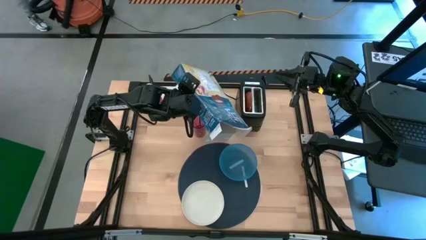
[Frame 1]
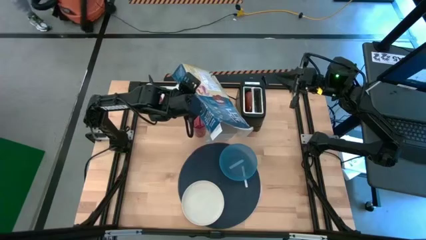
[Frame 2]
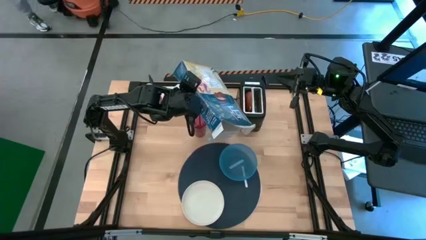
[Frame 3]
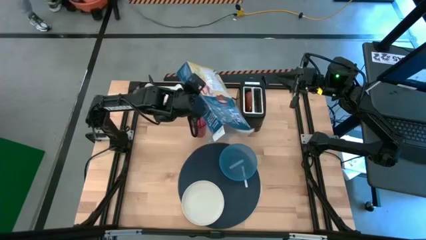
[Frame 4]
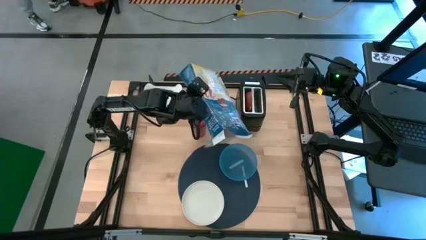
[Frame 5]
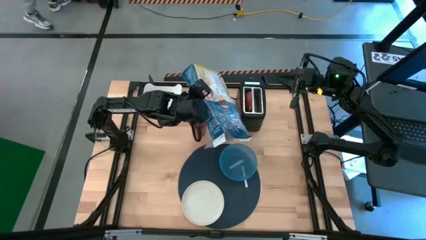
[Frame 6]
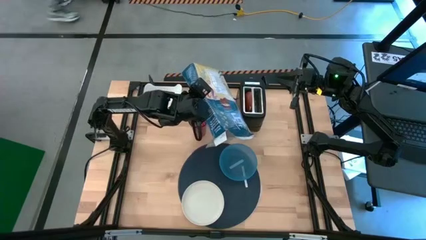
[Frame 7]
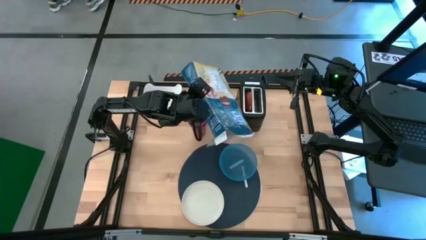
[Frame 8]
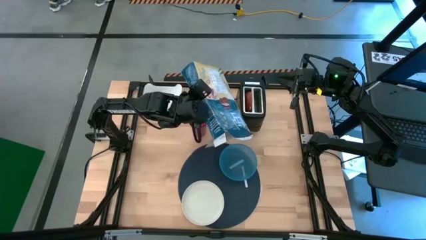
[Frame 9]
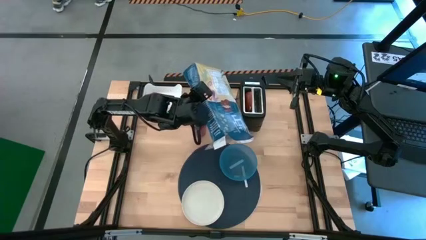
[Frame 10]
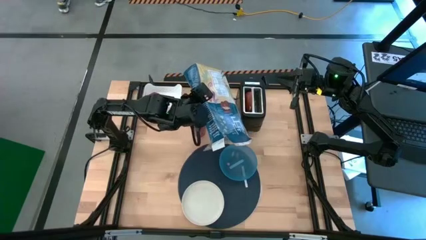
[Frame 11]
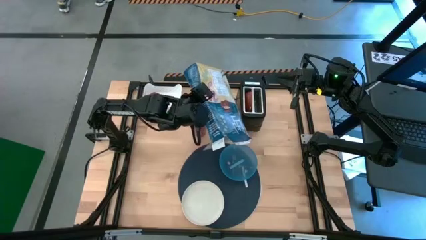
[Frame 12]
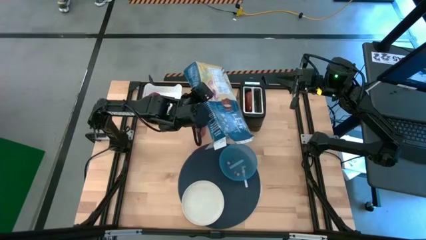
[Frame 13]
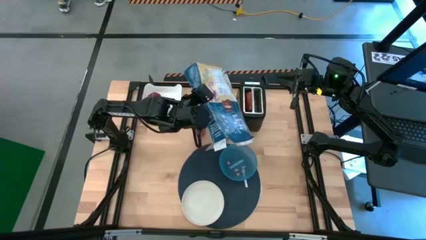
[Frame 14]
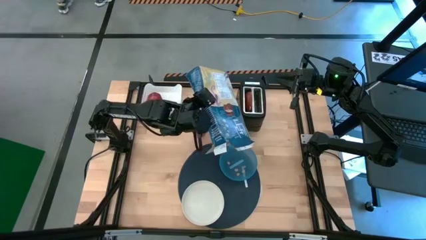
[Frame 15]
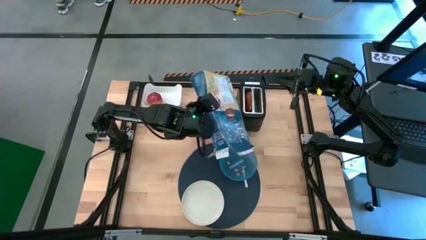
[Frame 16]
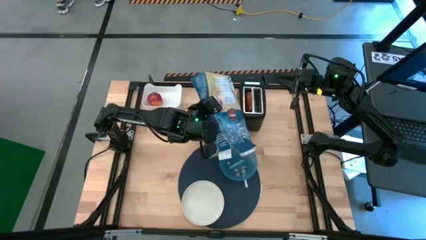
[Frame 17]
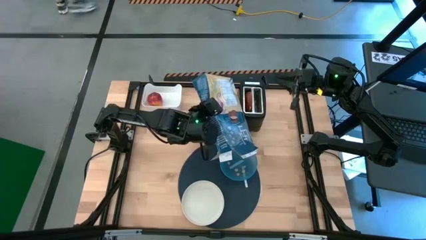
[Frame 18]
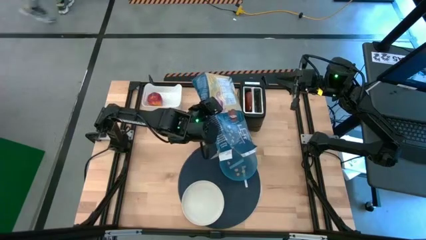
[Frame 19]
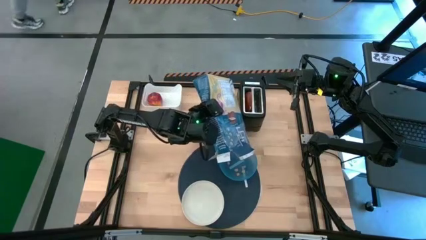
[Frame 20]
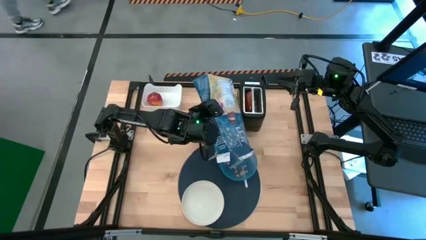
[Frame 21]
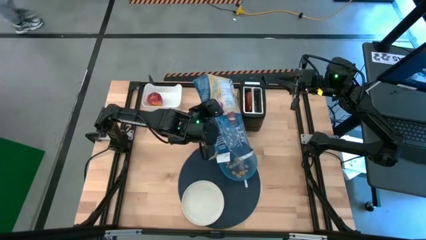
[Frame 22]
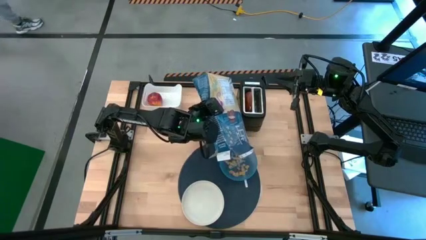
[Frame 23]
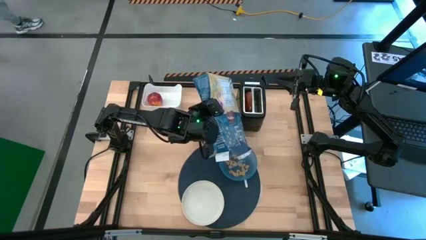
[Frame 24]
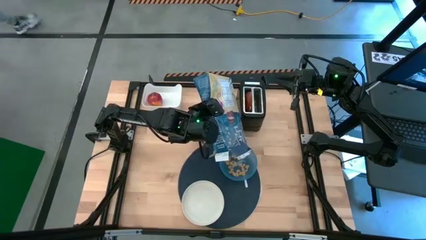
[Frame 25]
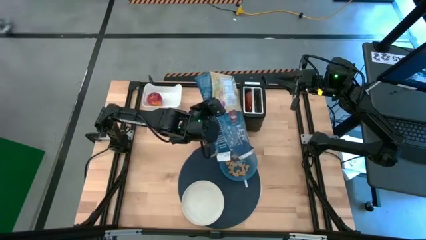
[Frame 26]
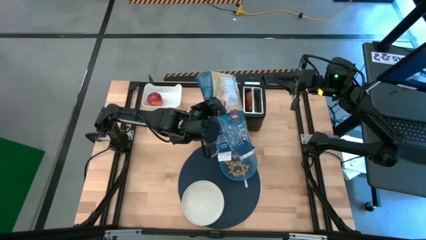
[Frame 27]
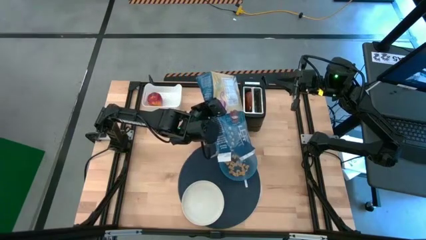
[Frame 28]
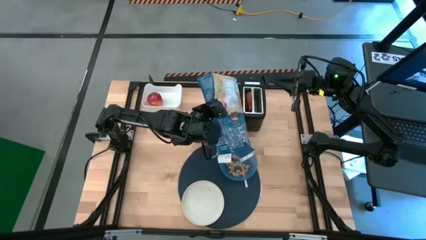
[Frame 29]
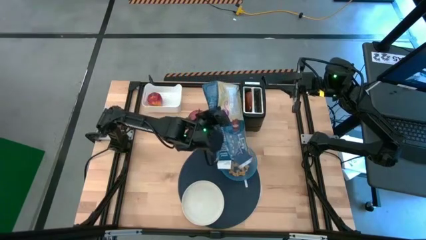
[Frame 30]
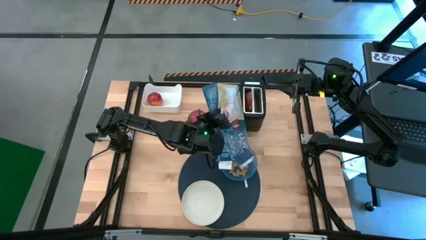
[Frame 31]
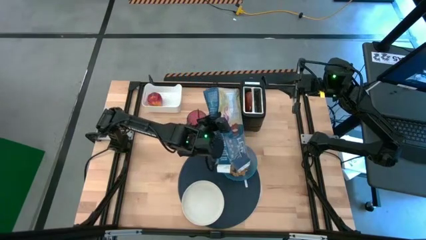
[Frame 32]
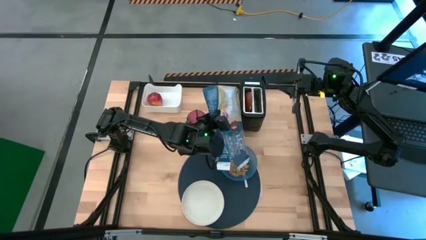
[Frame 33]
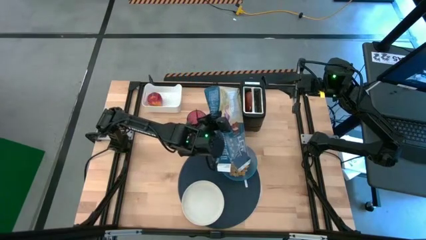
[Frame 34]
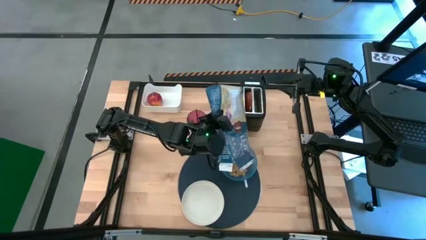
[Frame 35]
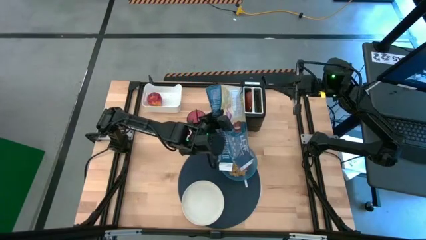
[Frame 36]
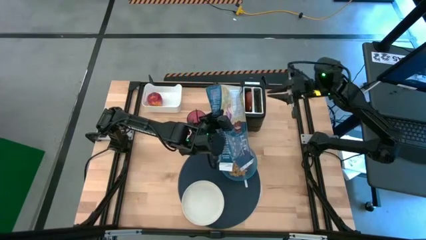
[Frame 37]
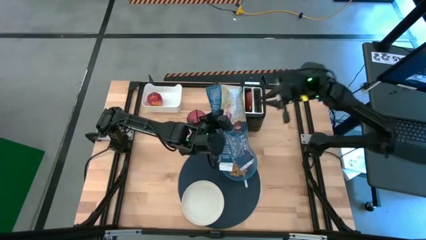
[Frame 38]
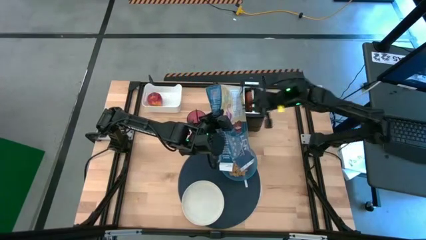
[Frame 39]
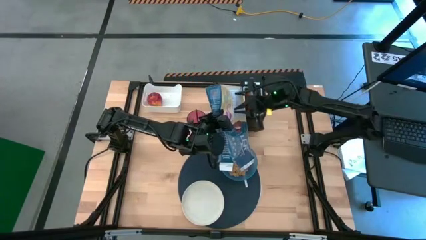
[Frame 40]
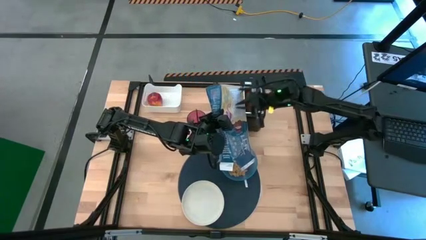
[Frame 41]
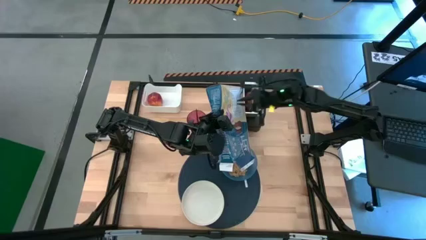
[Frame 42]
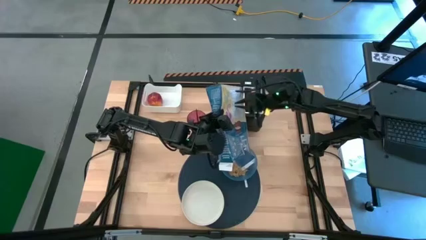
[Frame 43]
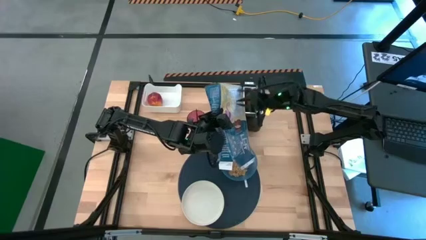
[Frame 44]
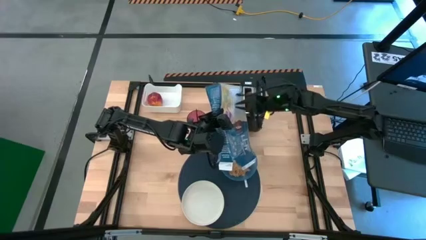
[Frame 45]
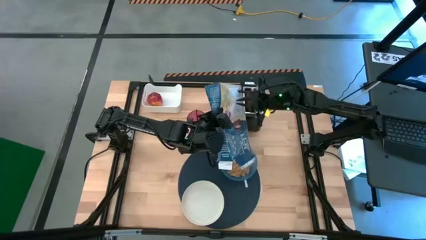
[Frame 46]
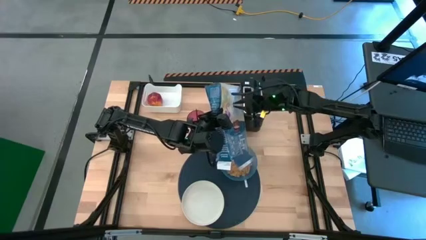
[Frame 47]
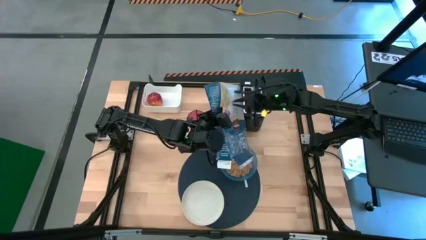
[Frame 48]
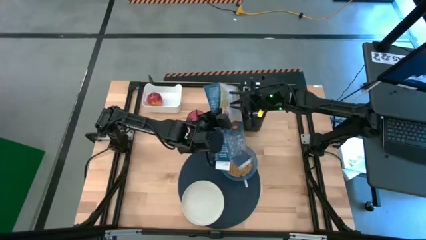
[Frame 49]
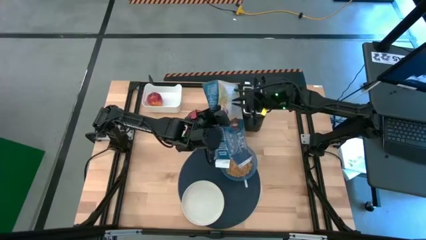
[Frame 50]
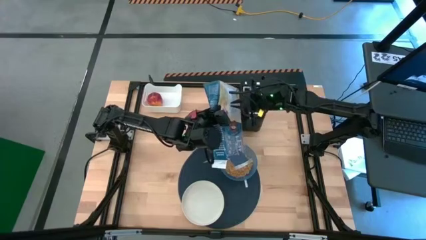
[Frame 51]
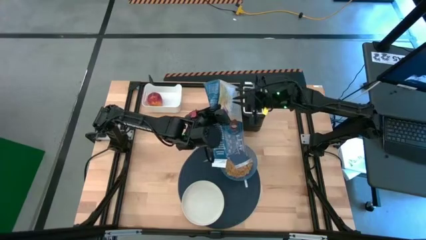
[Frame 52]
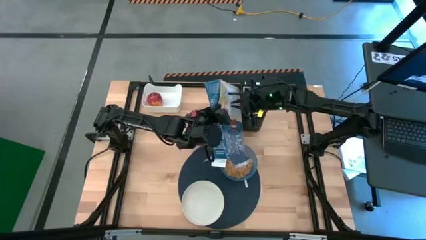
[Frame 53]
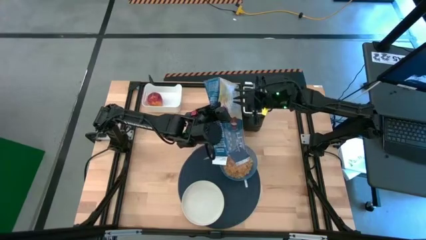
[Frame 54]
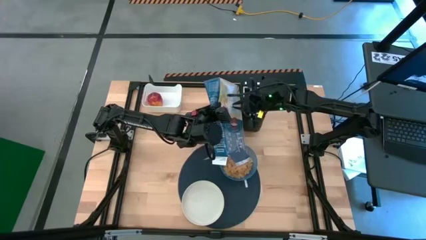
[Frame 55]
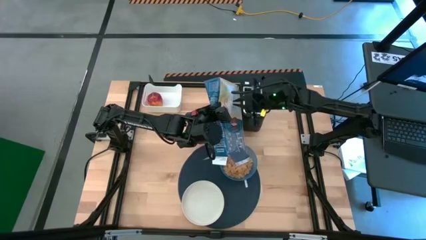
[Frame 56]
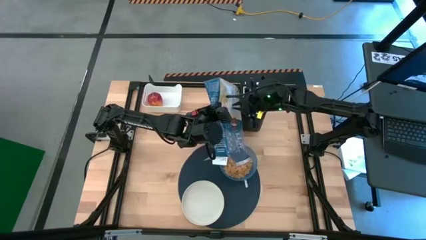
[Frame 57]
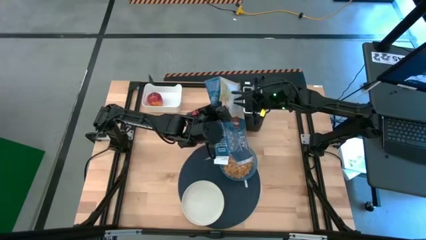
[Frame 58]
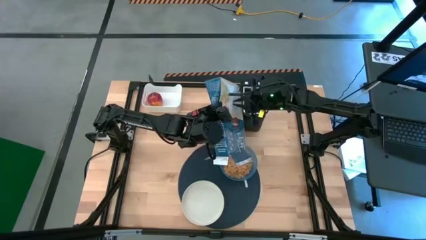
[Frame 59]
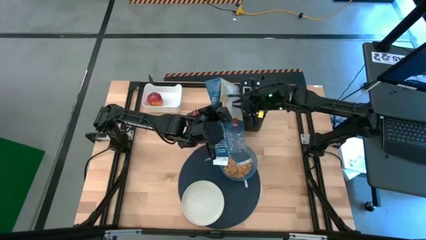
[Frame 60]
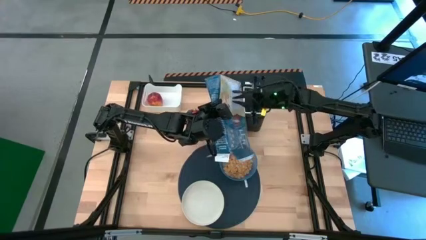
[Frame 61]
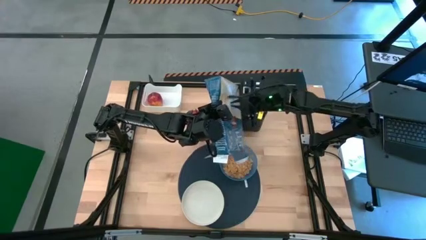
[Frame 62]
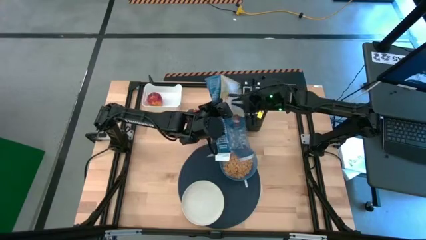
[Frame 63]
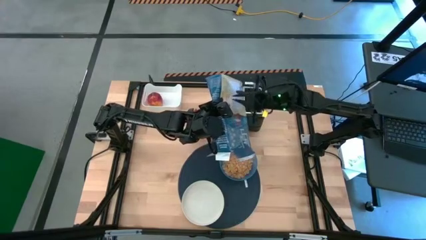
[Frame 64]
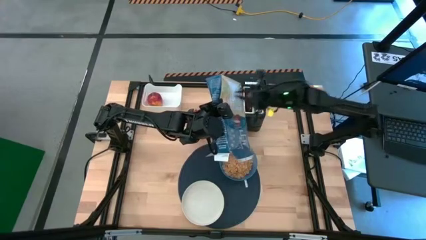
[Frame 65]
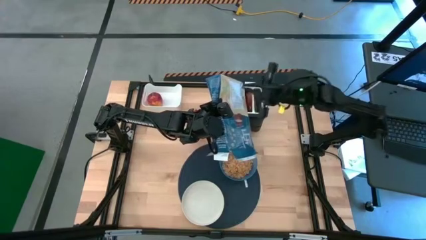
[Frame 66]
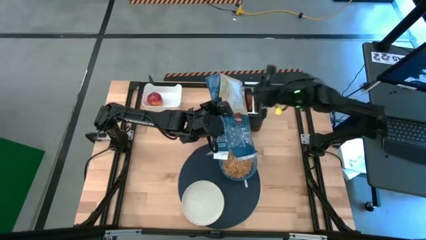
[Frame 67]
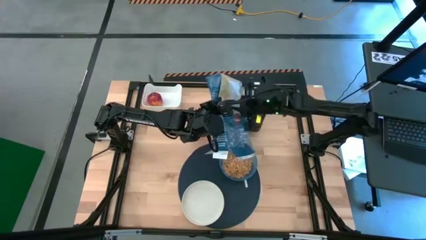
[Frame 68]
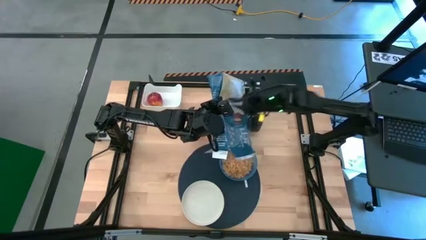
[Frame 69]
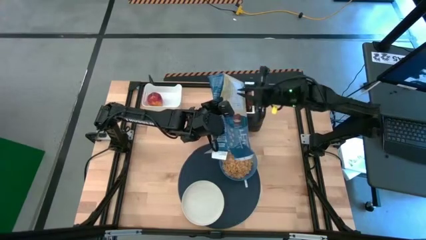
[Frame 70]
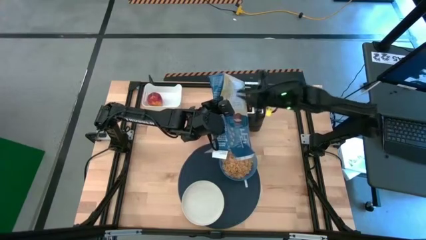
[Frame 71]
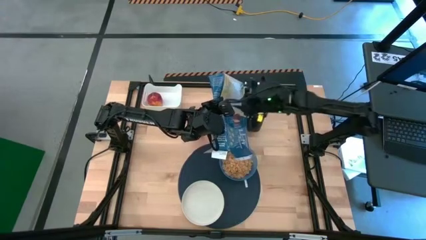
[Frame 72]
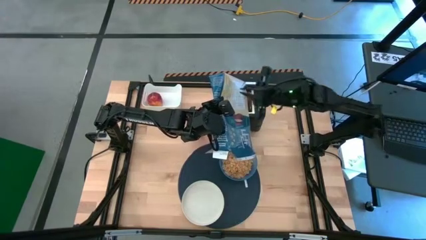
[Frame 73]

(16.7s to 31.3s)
Task: Arrange a breakfast setting
Pour the cereal from the cereal box into the blue bowl

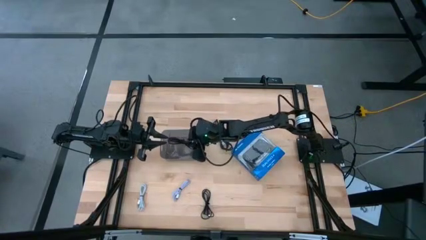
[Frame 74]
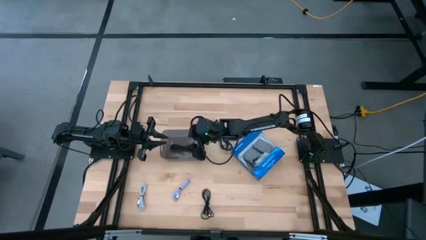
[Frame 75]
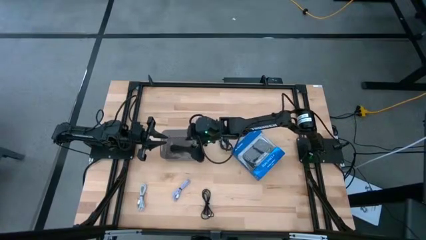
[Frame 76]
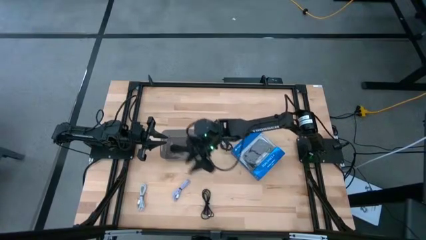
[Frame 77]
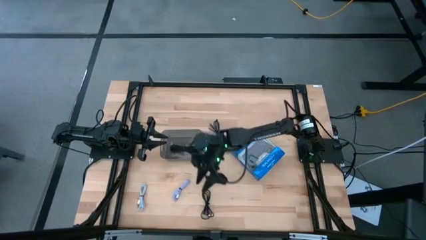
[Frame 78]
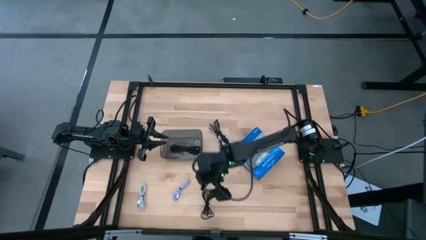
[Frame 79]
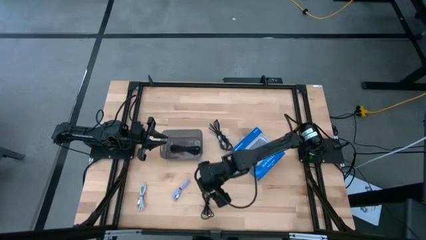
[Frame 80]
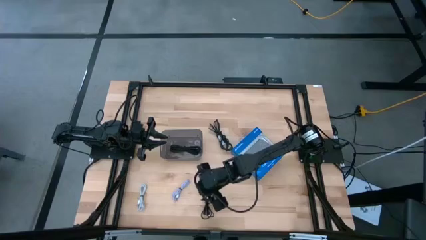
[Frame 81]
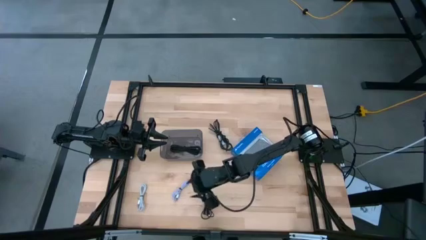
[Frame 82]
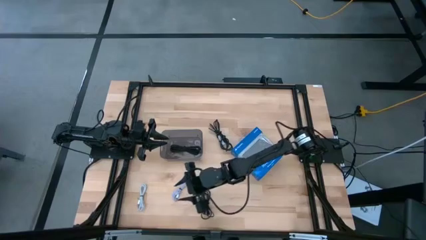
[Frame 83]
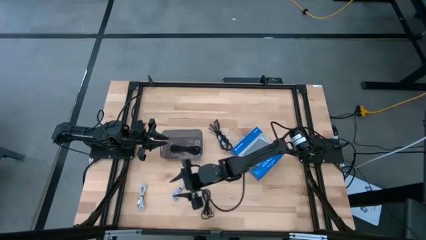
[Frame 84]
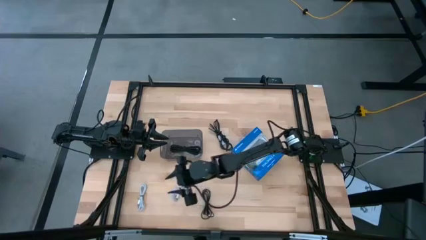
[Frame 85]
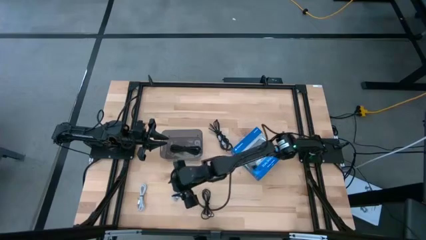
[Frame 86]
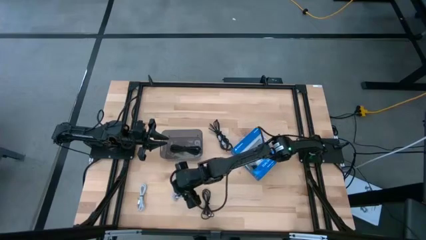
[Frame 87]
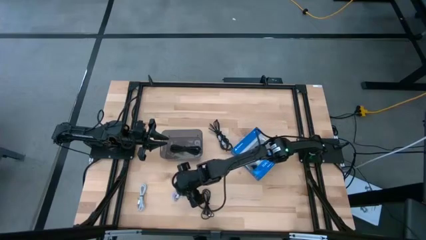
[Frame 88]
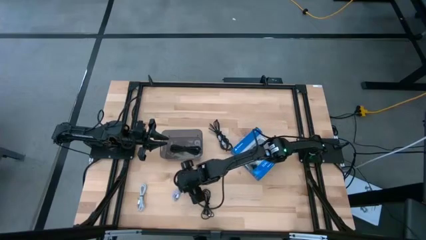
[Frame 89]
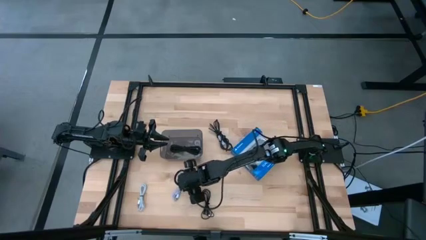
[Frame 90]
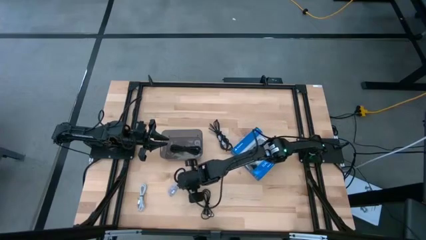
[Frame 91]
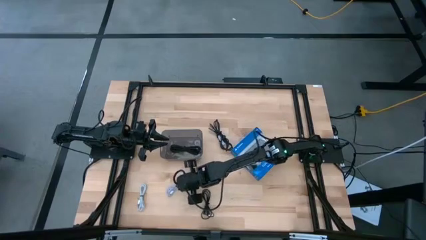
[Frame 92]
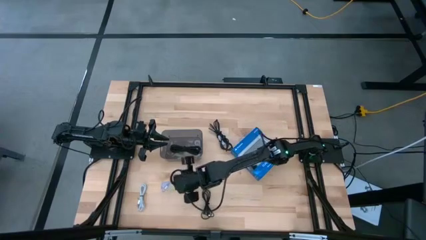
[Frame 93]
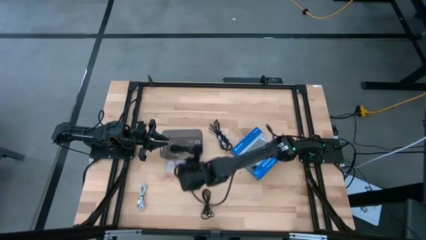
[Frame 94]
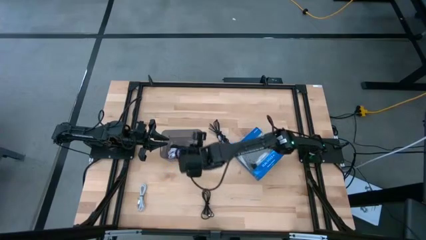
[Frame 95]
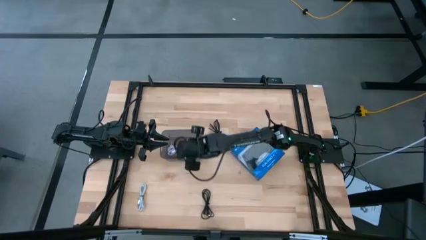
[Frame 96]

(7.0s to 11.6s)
Task: Pick and place USB-C Cables
Put the purple charger cable into the black bin
